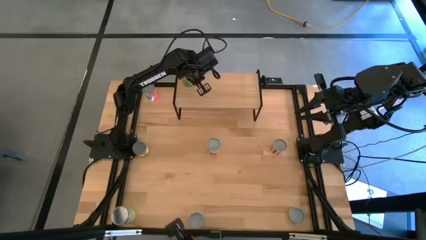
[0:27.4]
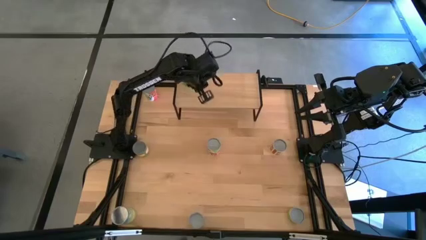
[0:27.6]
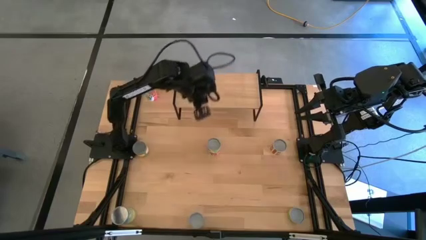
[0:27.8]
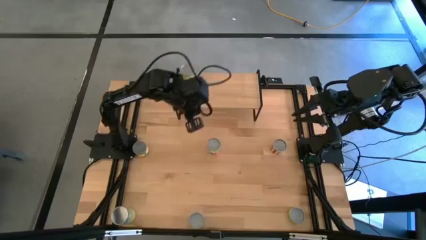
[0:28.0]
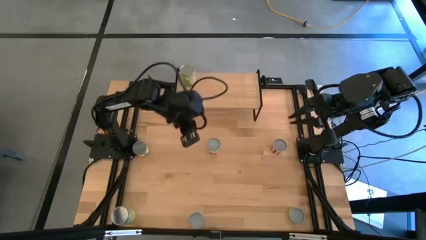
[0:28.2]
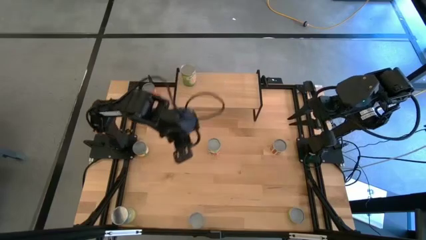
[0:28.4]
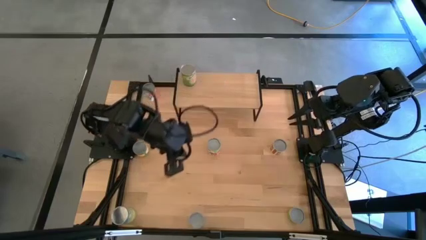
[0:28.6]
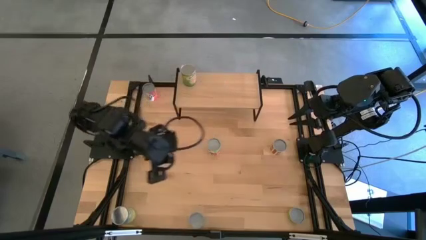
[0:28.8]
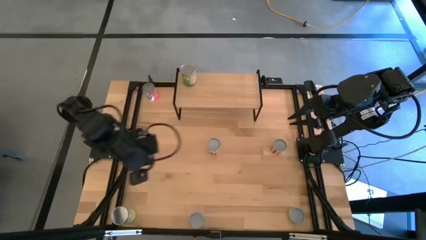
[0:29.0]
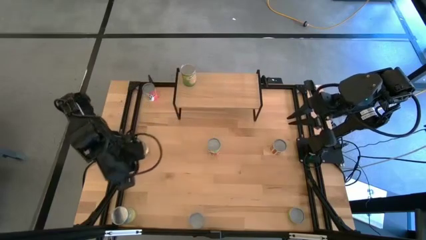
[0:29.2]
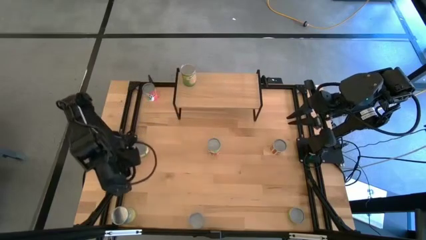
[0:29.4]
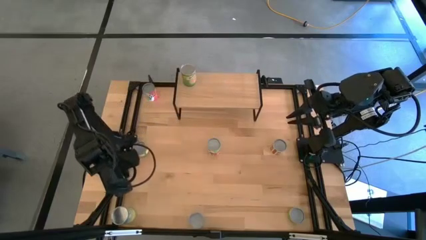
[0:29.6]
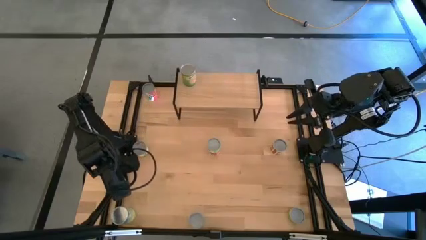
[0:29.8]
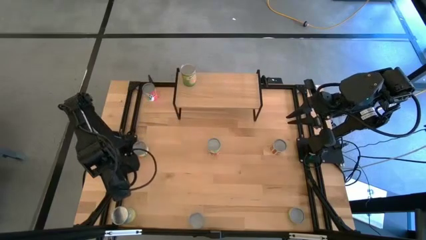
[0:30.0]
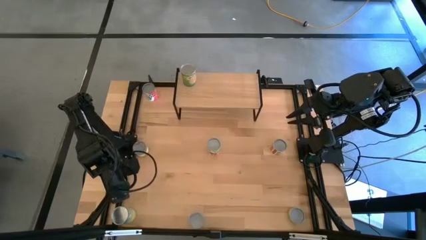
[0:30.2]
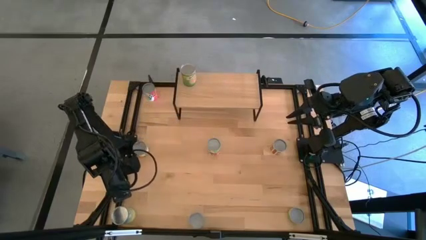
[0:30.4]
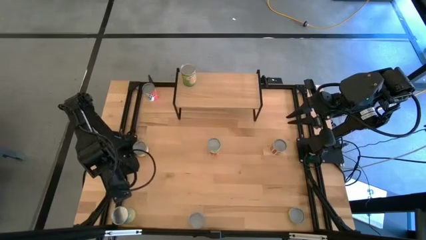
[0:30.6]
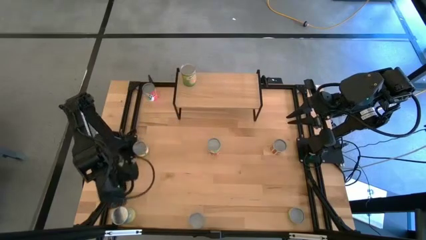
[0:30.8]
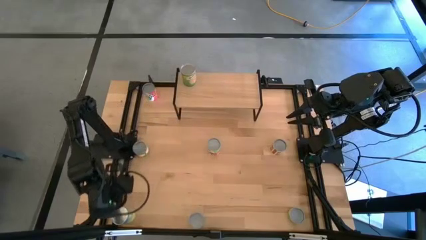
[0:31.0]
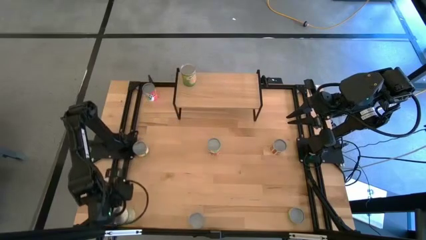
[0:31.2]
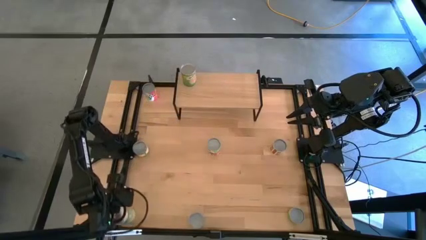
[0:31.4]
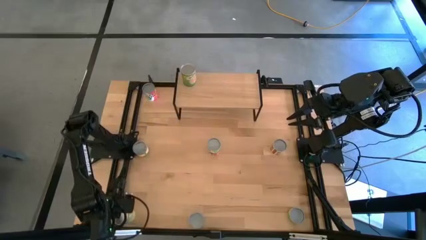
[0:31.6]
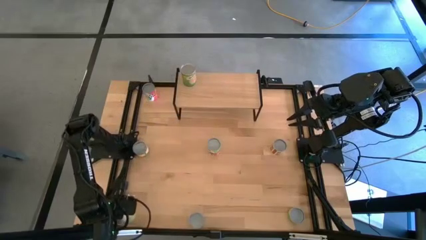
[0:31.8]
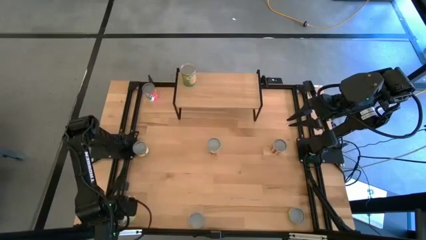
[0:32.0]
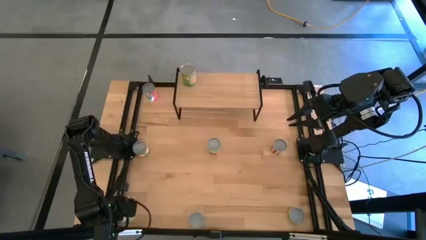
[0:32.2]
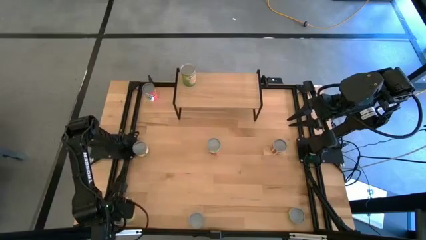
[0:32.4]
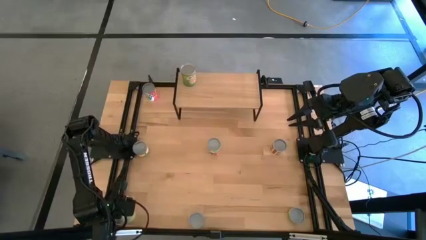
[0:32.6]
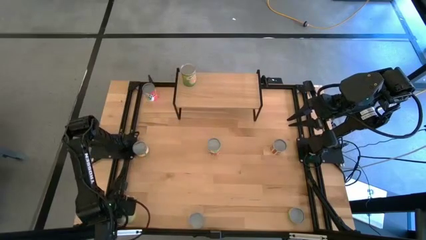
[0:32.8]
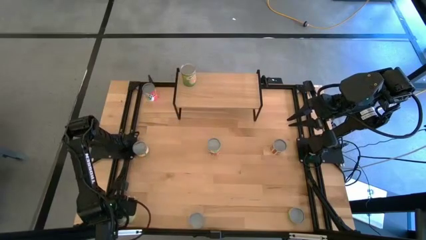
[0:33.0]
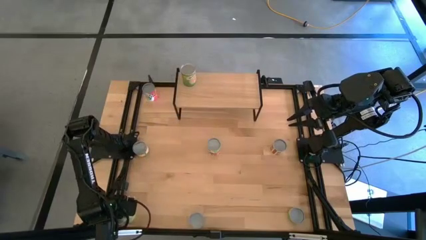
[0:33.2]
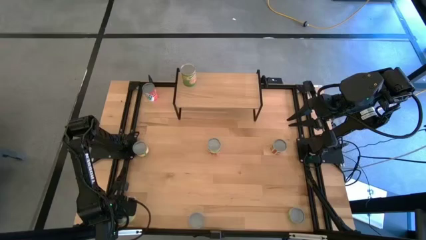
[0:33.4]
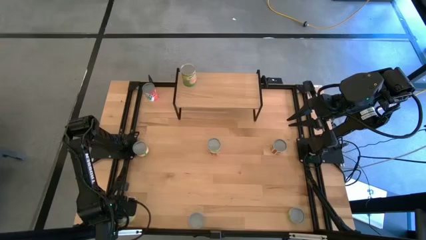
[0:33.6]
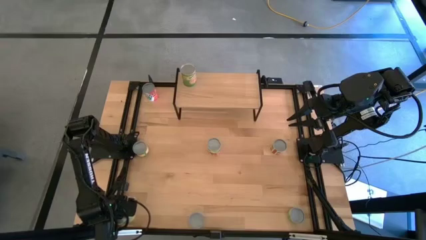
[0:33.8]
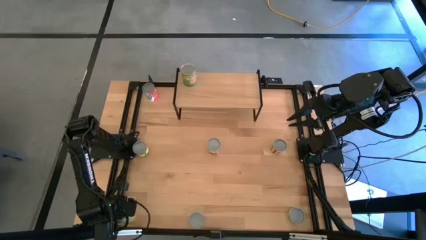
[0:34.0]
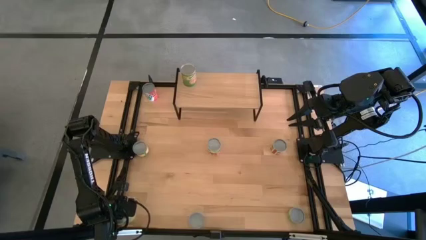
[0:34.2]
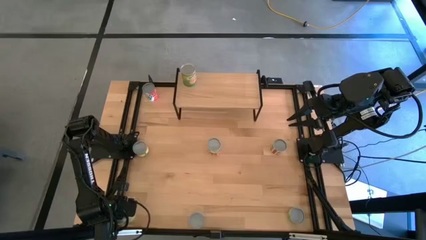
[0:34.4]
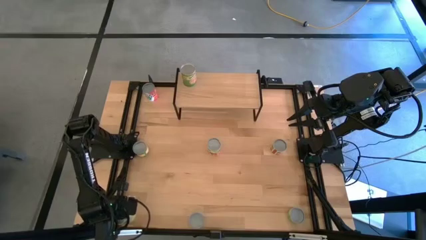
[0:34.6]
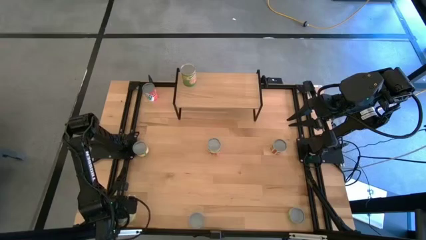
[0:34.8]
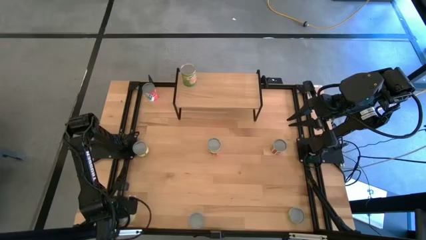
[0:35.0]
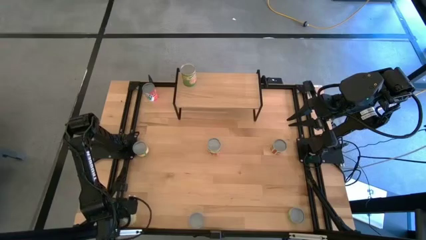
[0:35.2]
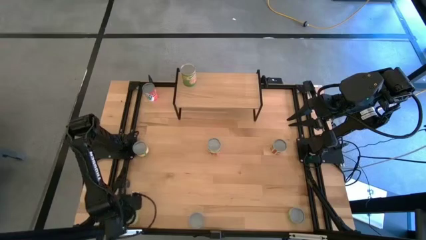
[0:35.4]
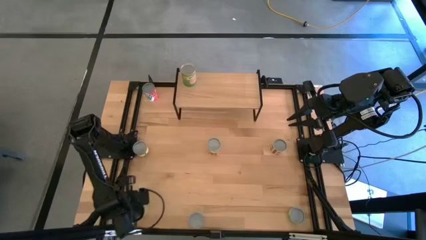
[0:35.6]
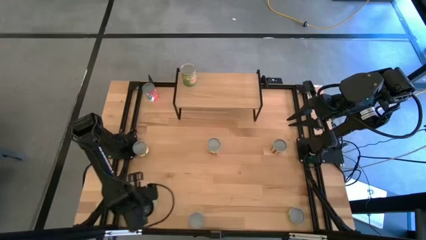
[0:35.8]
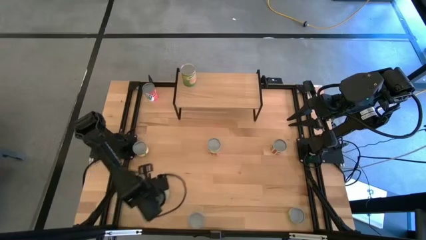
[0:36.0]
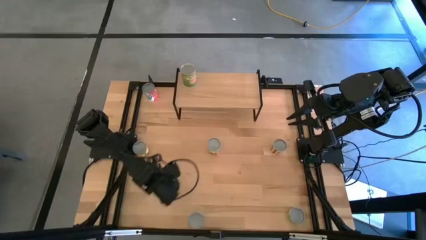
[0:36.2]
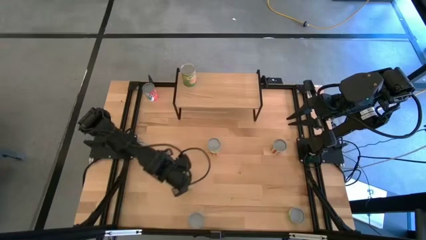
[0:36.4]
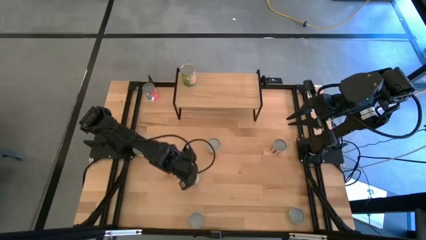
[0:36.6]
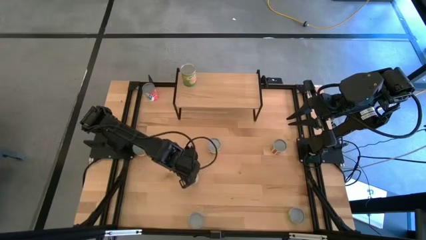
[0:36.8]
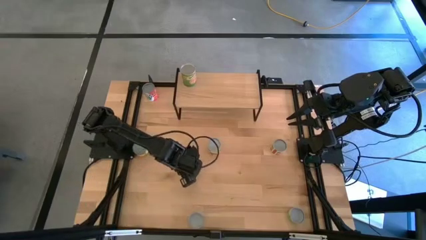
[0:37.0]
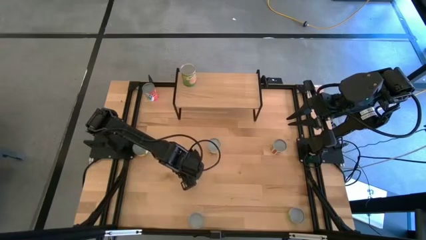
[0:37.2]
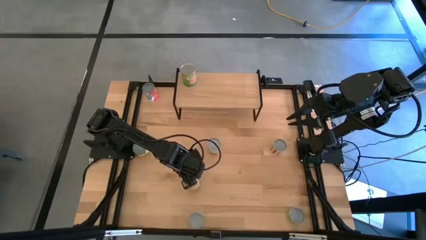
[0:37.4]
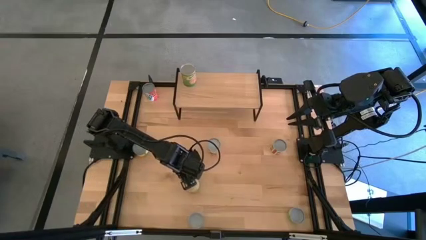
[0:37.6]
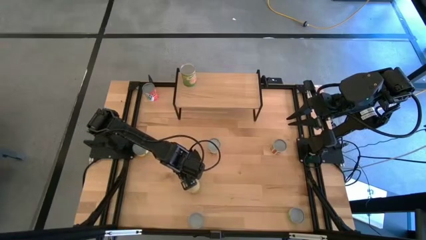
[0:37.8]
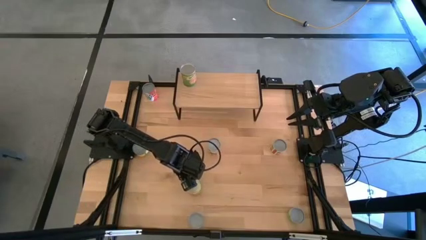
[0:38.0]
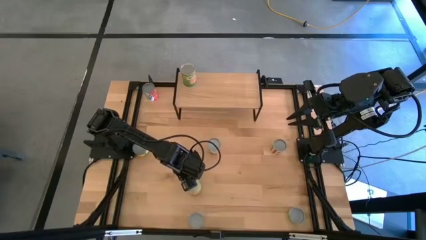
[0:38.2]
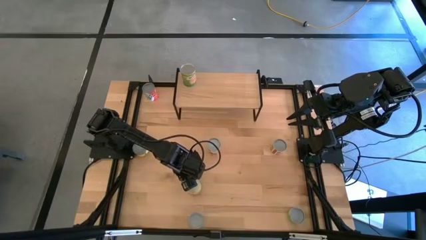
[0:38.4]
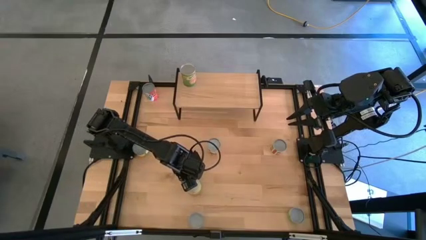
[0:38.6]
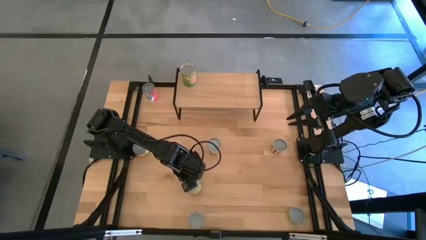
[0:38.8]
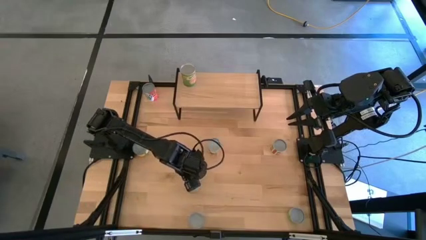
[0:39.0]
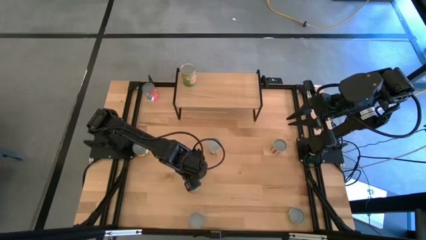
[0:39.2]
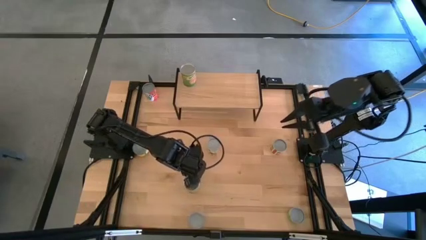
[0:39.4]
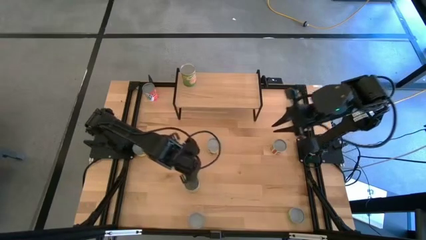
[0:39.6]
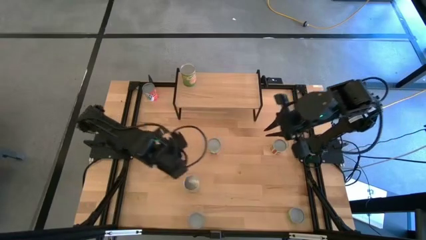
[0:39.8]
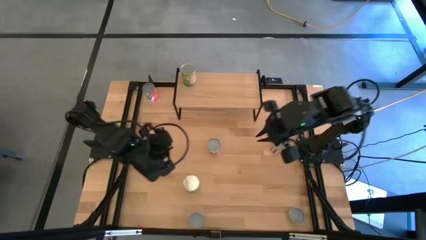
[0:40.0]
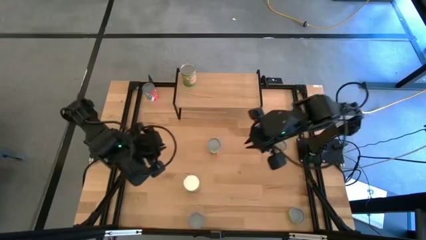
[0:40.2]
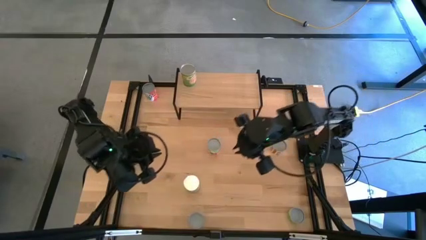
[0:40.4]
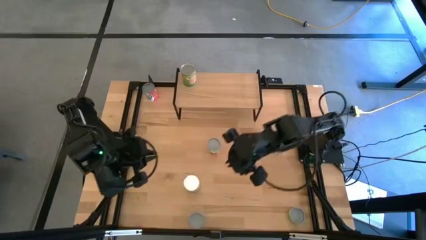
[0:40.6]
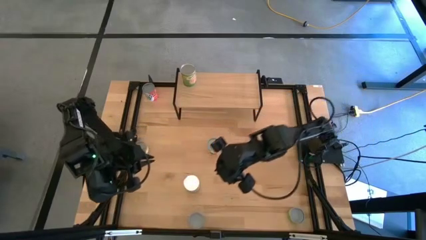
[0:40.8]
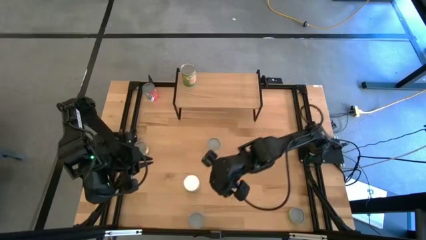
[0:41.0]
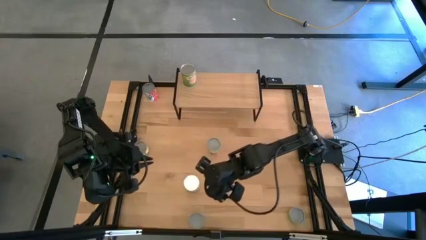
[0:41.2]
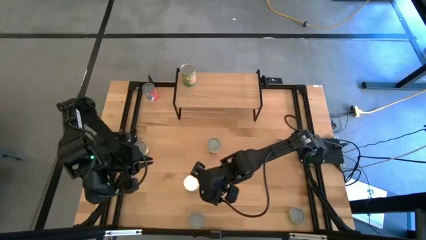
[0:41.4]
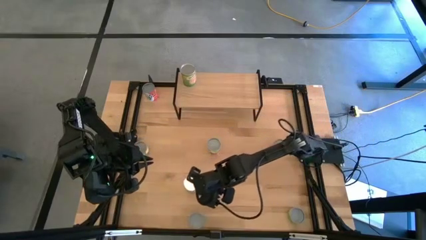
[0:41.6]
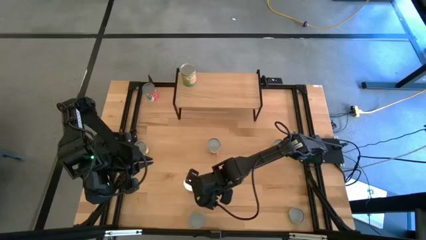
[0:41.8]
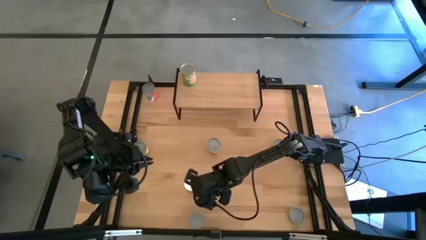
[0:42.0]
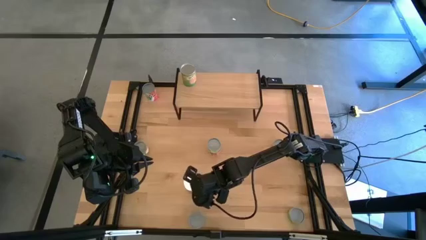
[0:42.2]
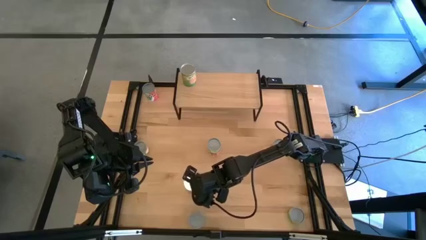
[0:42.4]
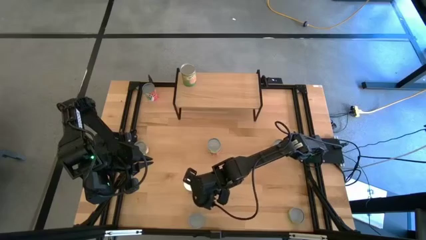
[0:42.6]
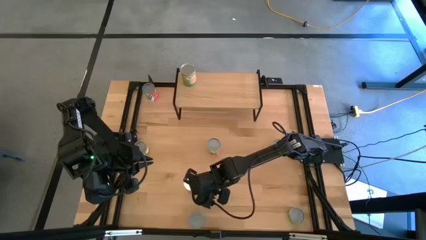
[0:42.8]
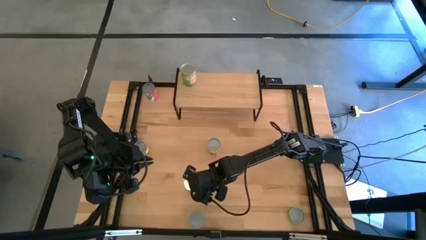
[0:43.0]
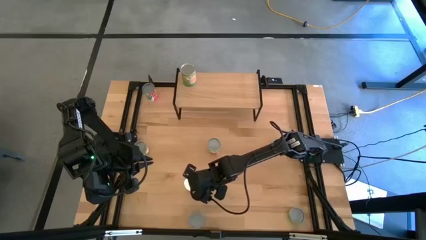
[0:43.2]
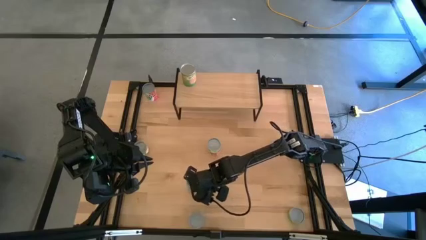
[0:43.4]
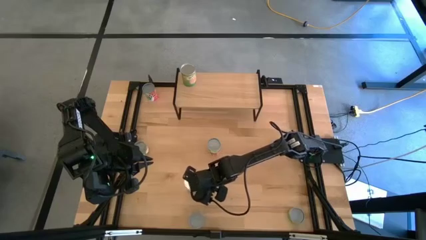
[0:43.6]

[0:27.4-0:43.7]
Task: Pick and place cans onto a shelf
Put the canned carrots on the shelf
